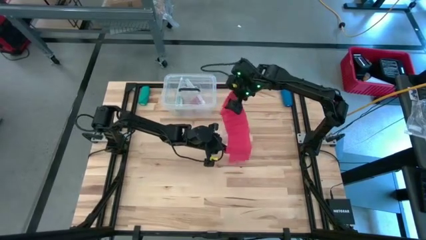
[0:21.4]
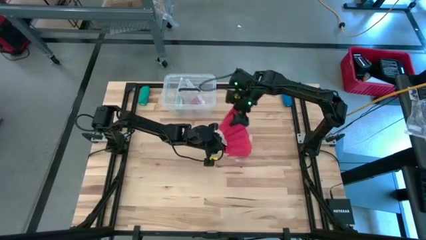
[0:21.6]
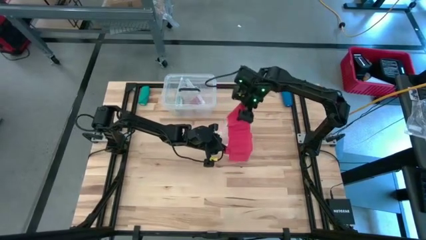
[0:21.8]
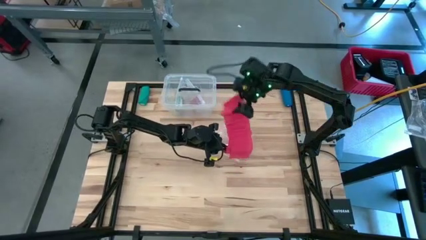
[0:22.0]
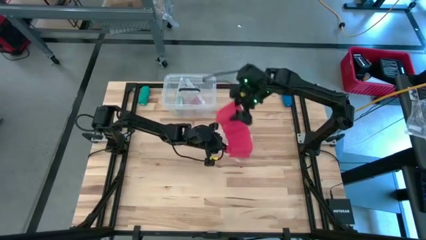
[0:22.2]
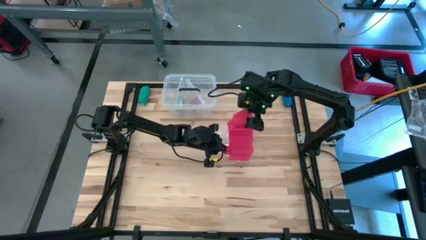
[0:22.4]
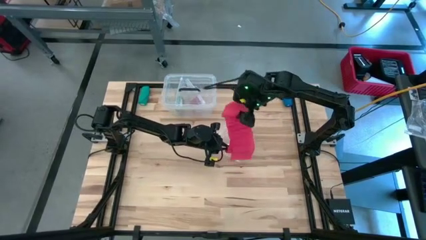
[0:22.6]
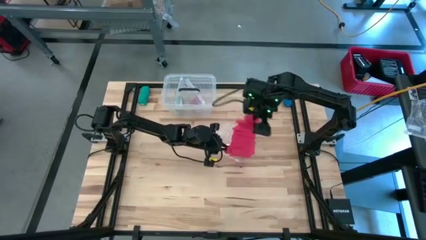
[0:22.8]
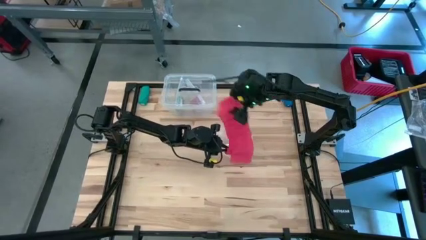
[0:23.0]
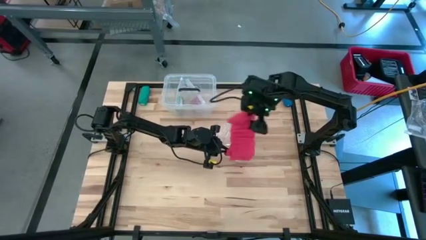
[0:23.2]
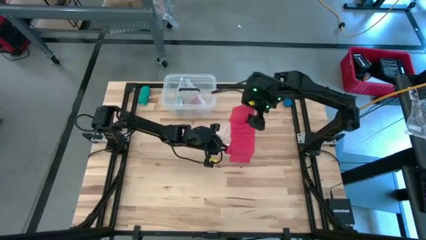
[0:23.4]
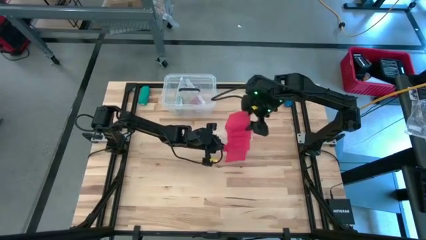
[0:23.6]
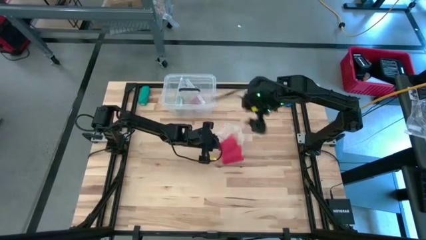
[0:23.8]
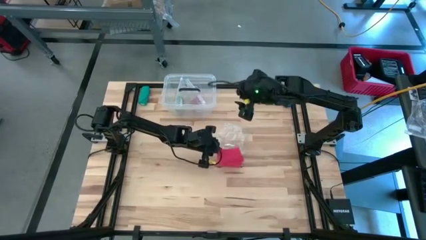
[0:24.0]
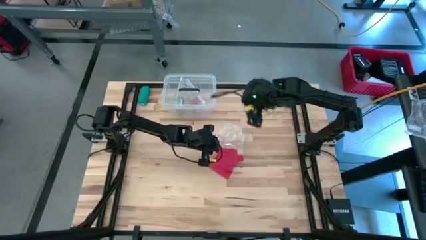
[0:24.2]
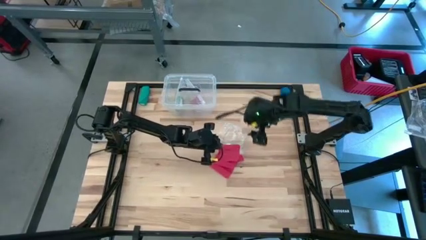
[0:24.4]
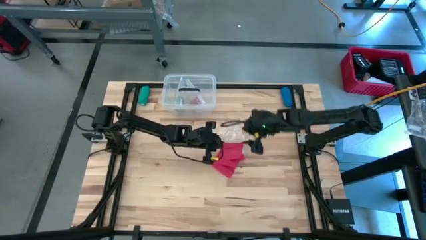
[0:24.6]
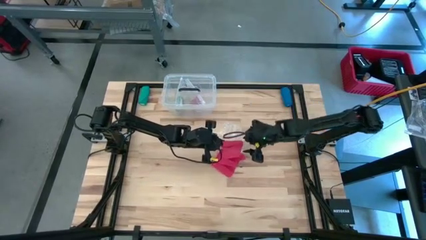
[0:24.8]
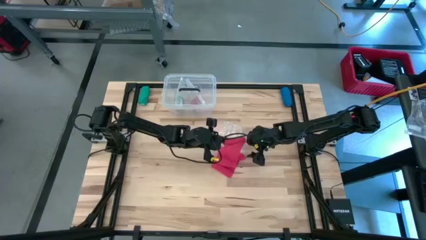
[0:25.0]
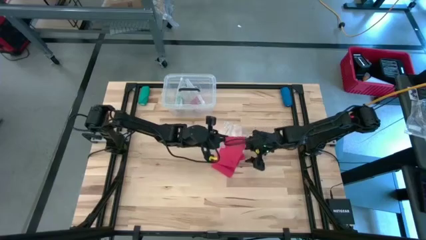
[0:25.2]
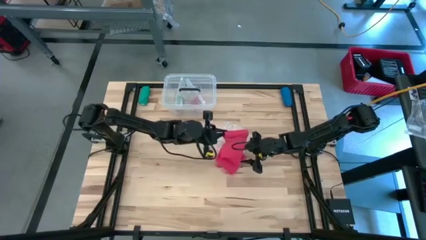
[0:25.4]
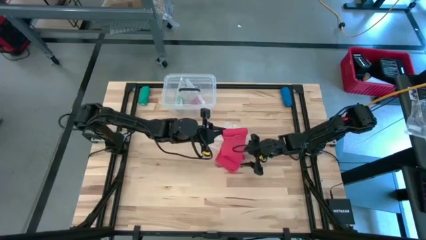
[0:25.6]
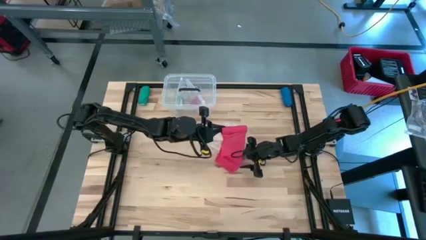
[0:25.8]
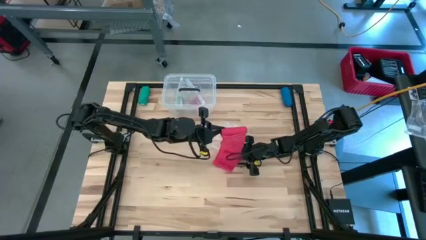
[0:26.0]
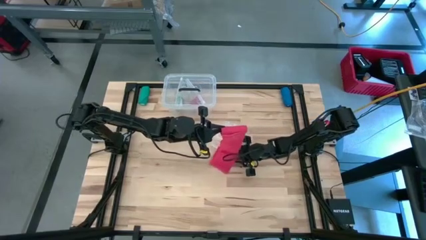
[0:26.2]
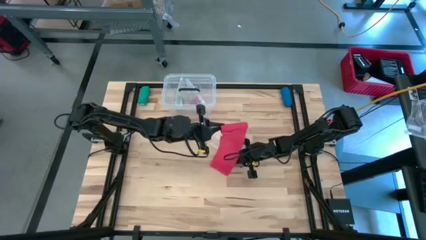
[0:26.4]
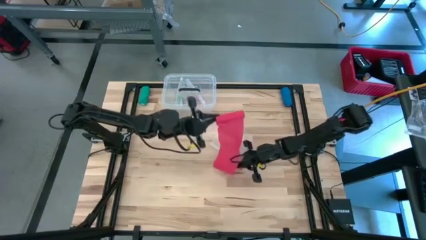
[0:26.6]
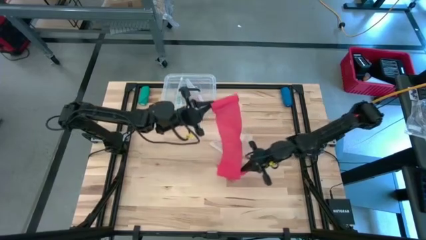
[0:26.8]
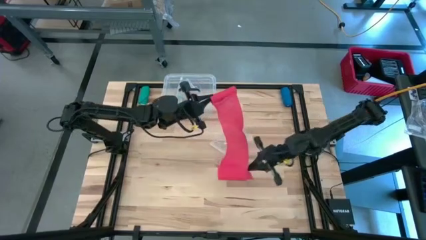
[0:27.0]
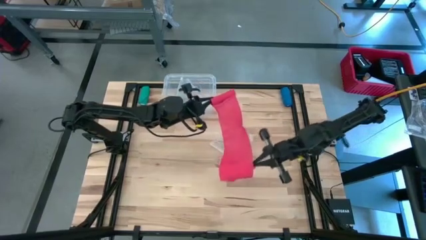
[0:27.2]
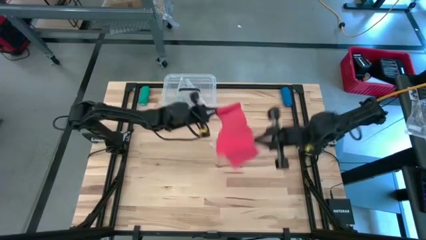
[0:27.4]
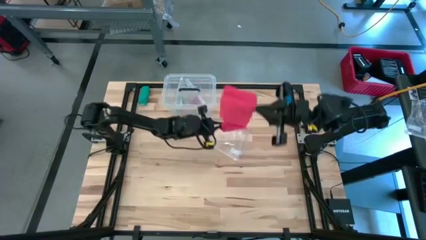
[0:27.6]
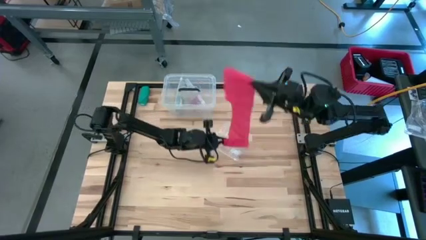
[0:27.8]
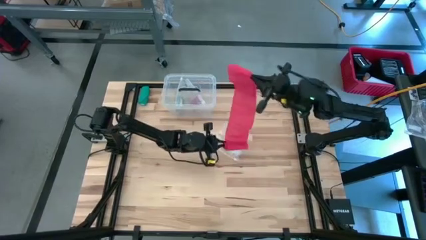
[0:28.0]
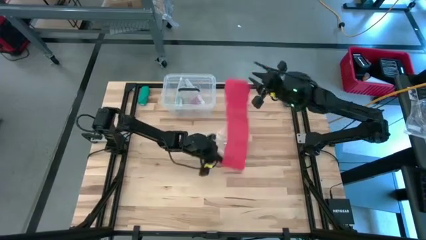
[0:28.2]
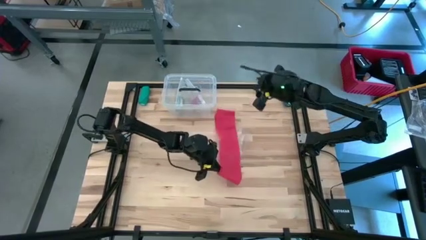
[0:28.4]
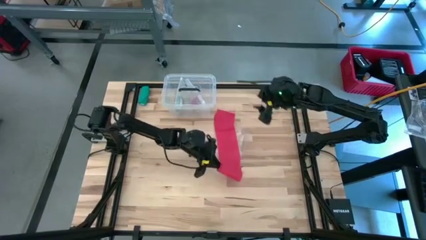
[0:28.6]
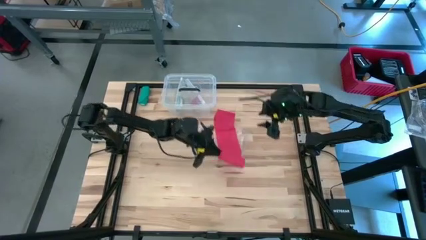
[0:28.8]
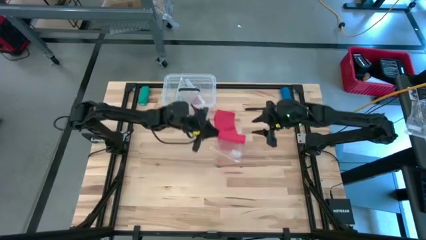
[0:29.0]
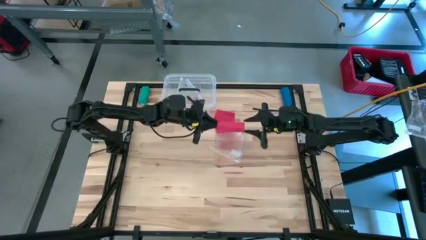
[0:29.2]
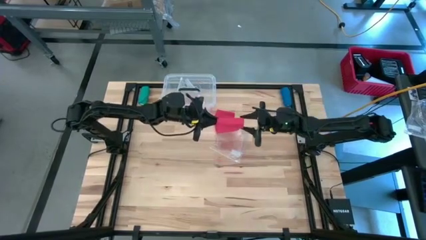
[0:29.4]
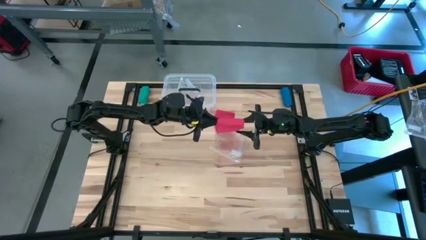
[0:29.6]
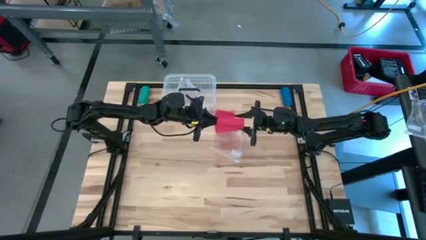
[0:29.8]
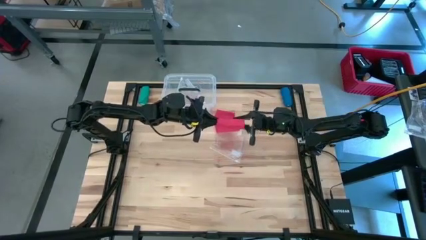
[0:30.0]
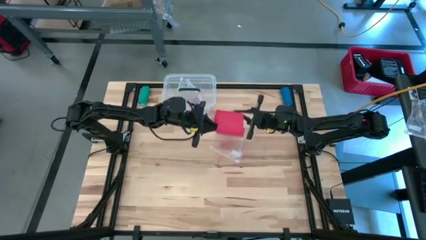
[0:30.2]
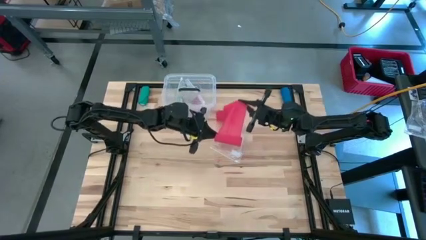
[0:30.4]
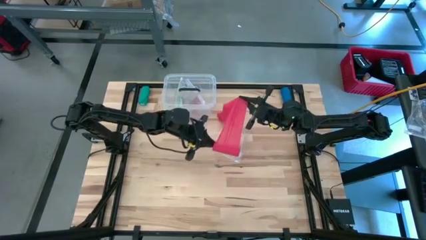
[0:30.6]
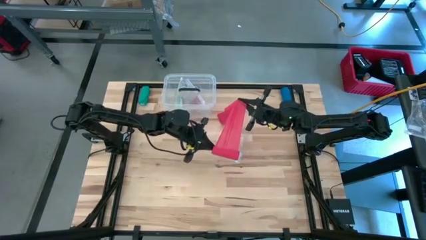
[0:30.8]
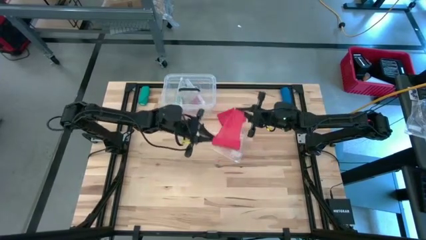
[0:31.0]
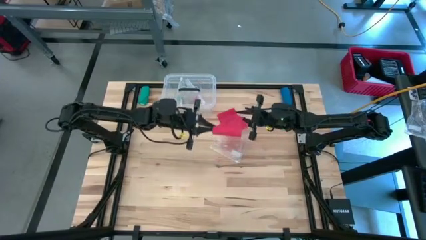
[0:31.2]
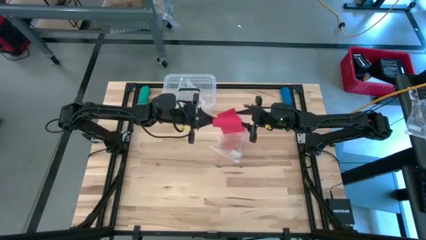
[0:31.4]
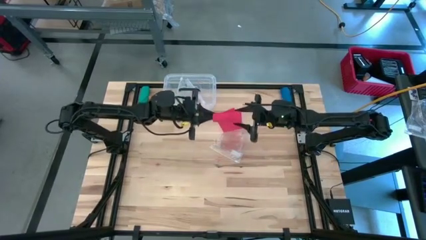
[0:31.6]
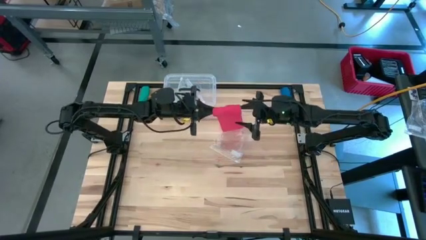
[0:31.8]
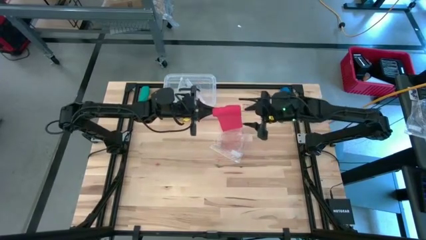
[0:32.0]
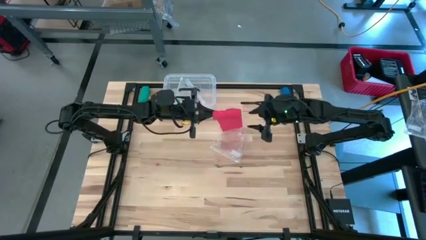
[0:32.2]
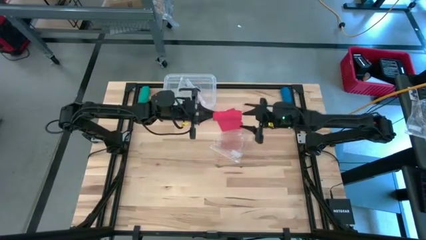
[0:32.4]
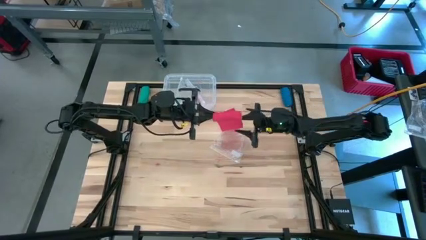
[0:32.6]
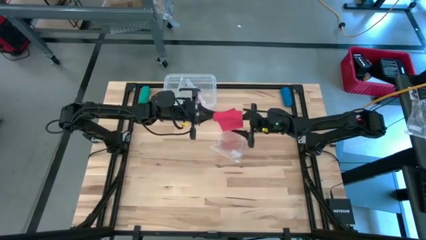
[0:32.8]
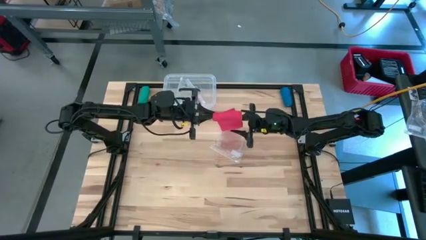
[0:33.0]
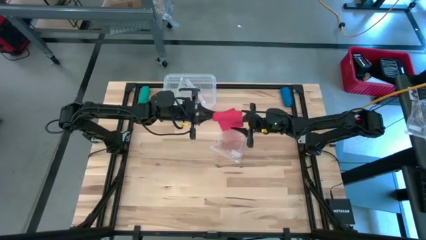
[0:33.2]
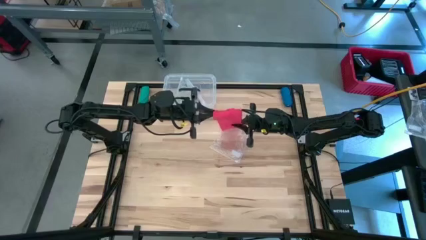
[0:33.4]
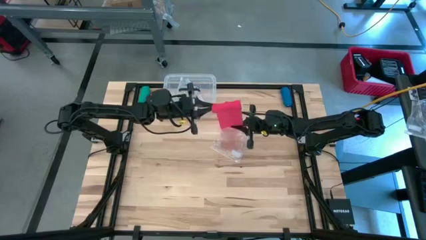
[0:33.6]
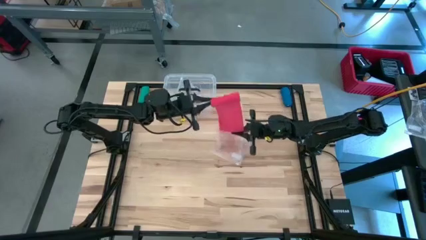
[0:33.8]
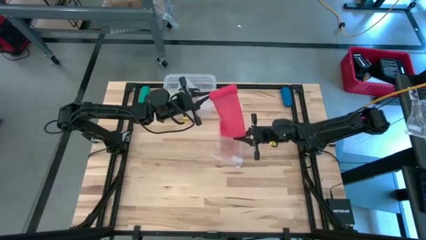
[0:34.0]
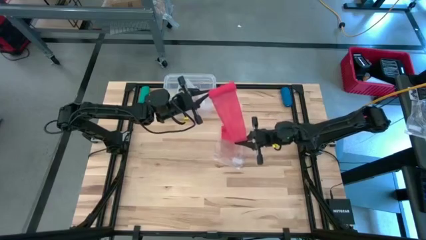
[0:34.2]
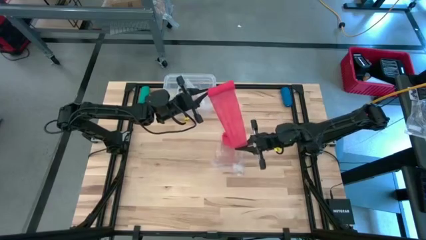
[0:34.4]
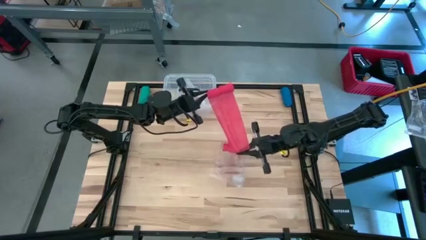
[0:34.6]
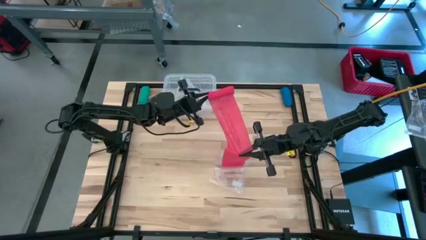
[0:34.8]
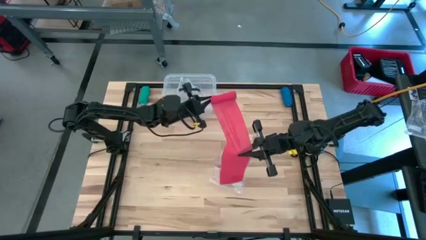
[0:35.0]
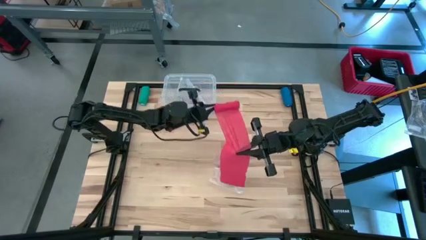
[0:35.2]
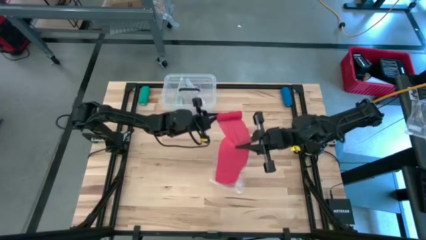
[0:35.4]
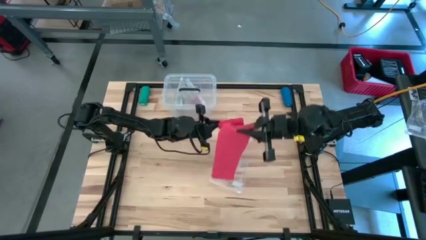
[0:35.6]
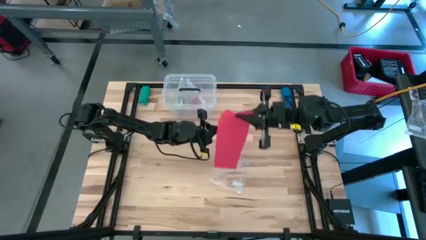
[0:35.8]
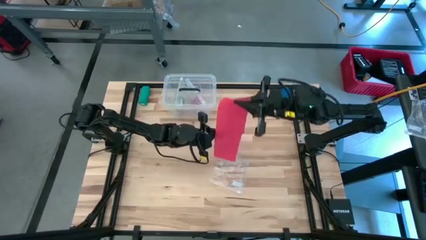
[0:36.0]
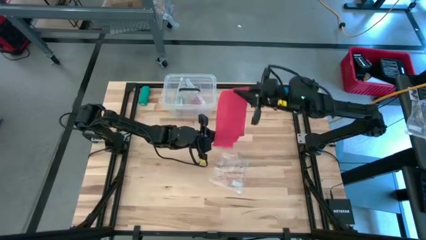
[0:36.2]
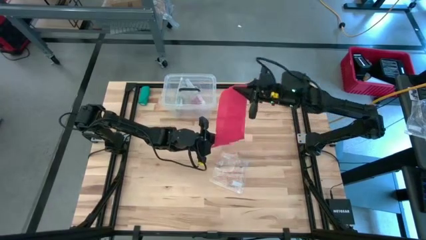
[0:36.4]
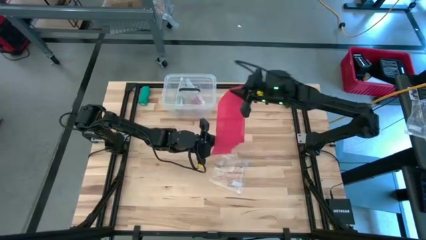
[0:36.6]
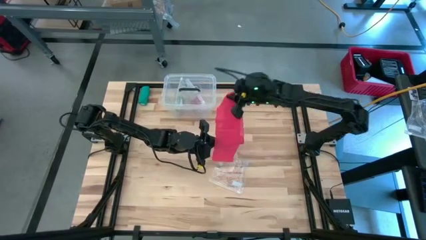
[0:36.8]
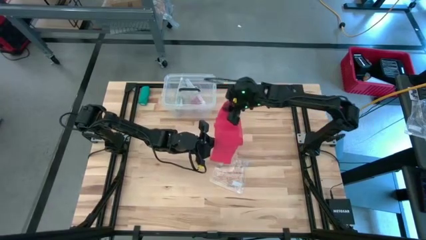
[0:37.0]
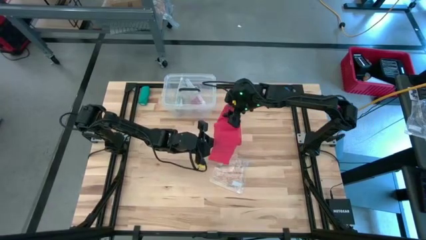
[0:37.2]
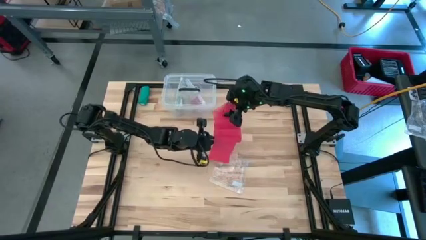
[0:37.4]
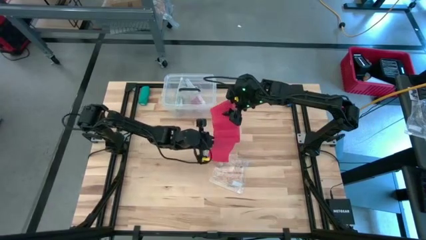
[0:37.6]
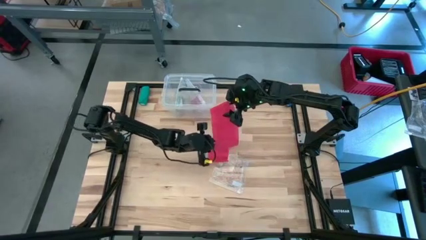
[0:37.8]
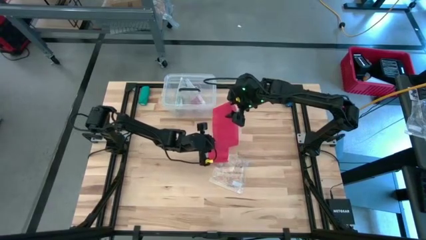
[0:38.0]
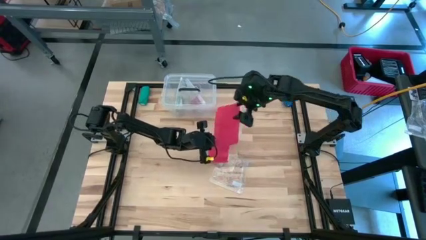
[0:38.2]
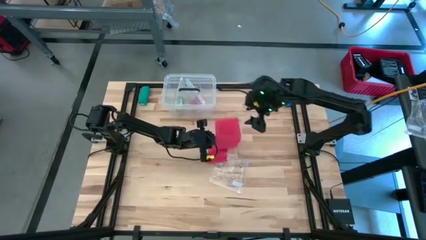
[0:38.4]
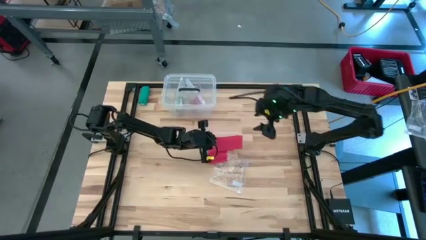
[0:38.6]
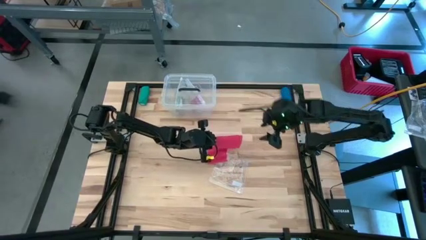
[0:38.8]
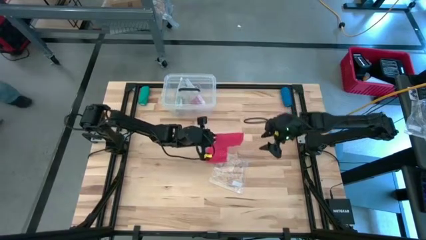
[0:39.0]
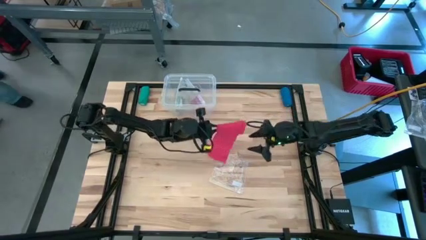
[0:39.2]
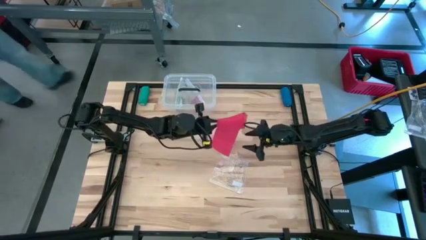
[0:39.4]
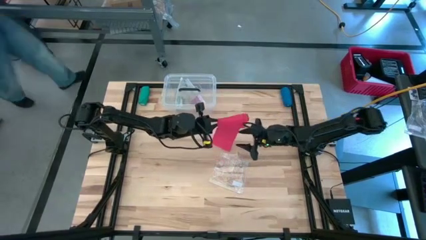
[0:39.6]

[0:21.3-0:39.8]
Task: Roll bandage
Roll the red bandage
